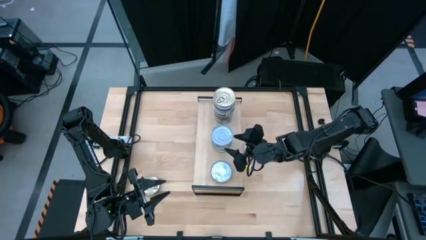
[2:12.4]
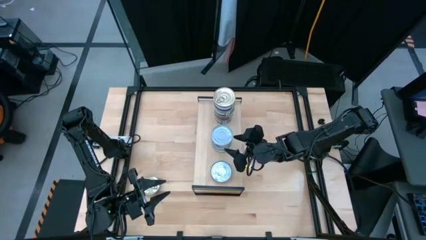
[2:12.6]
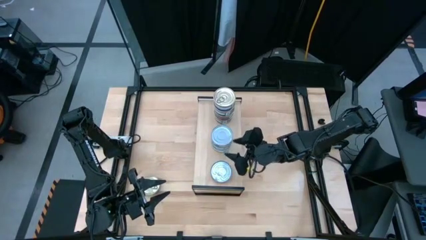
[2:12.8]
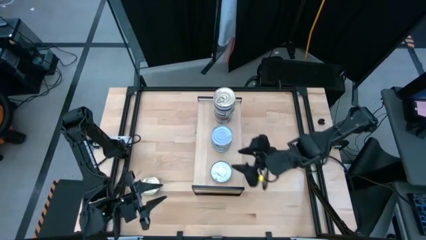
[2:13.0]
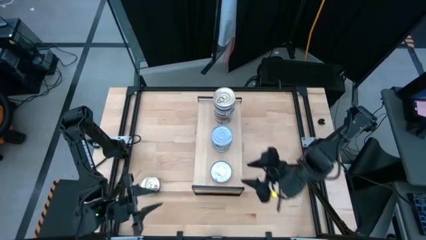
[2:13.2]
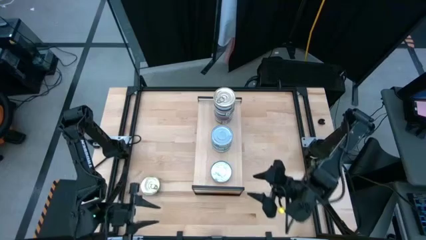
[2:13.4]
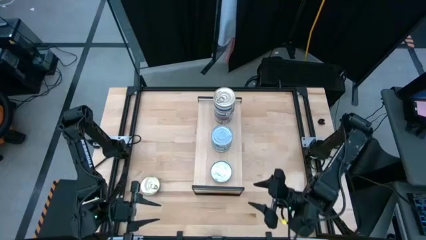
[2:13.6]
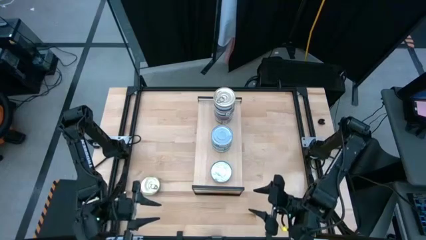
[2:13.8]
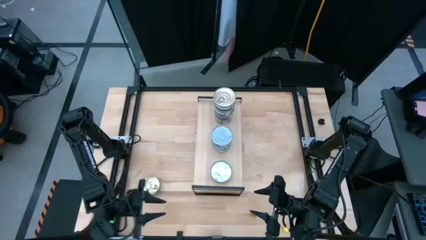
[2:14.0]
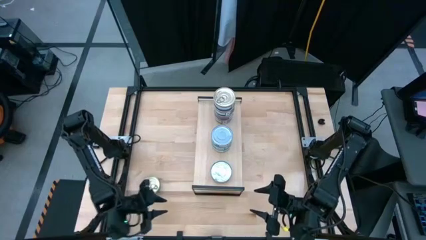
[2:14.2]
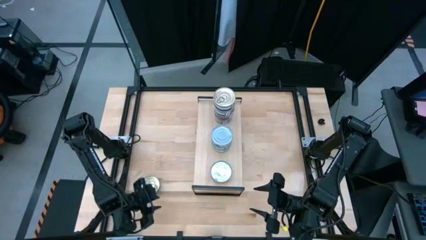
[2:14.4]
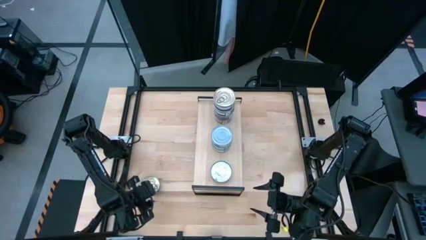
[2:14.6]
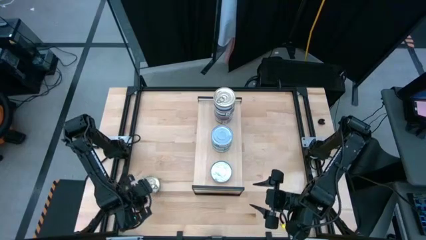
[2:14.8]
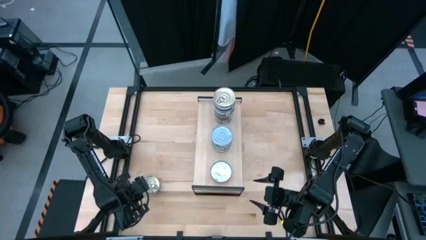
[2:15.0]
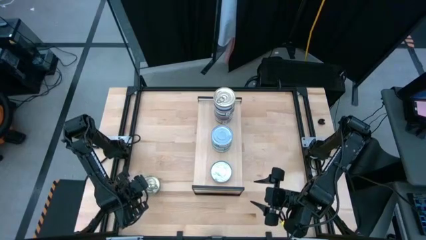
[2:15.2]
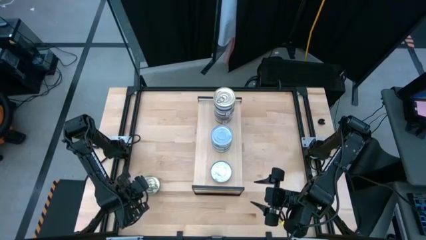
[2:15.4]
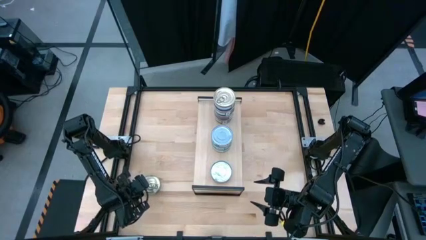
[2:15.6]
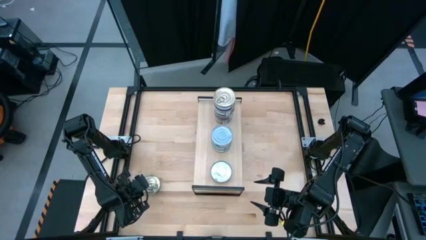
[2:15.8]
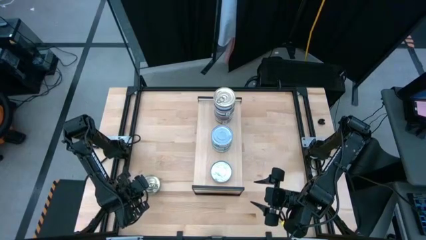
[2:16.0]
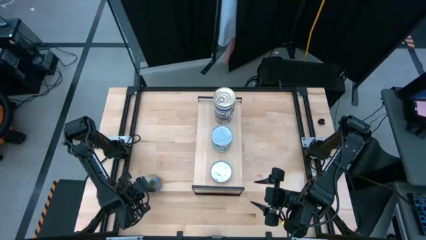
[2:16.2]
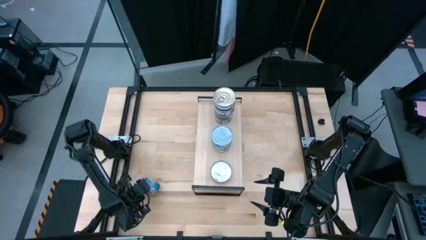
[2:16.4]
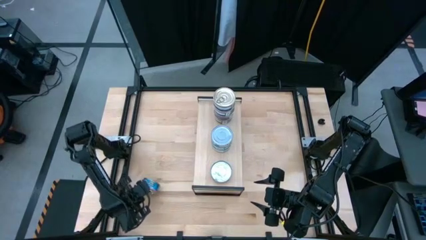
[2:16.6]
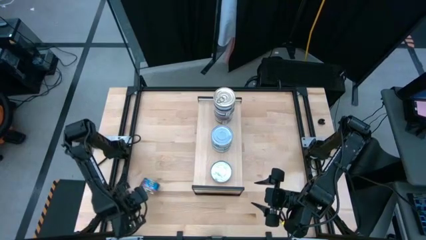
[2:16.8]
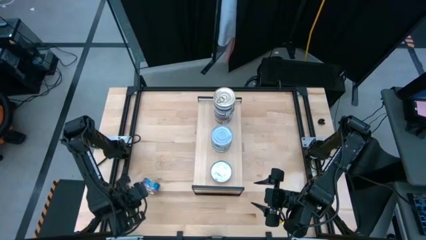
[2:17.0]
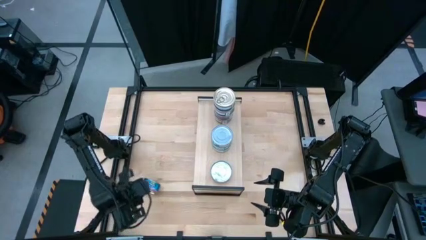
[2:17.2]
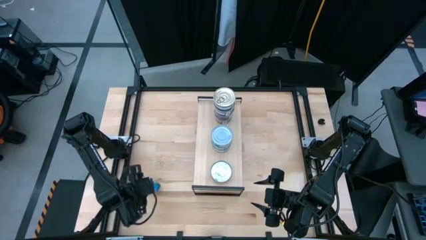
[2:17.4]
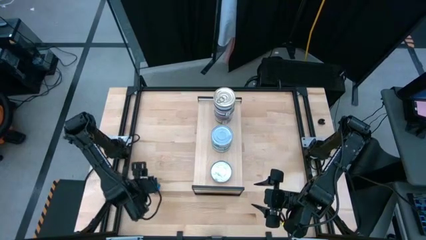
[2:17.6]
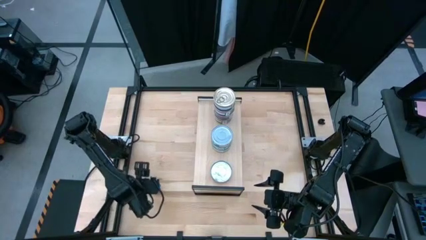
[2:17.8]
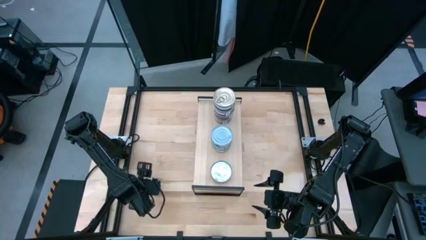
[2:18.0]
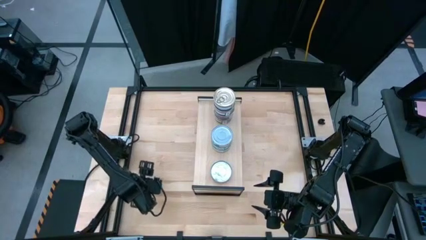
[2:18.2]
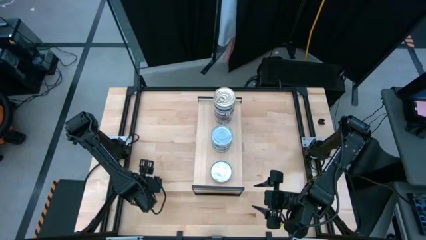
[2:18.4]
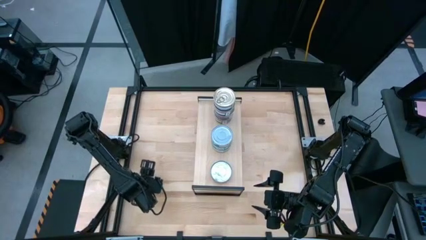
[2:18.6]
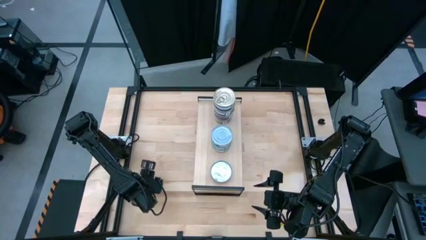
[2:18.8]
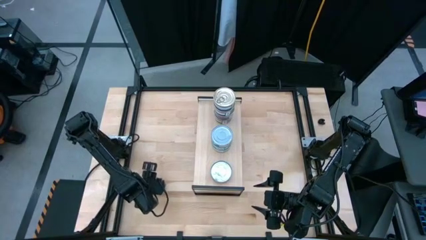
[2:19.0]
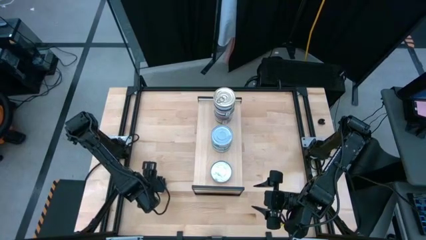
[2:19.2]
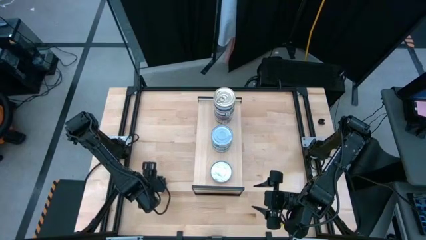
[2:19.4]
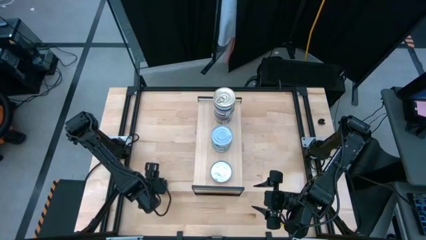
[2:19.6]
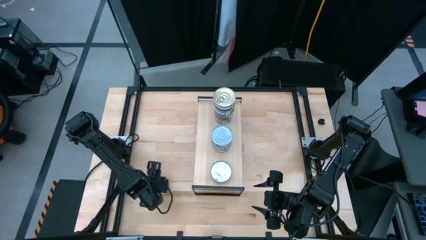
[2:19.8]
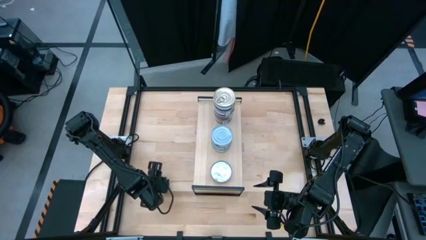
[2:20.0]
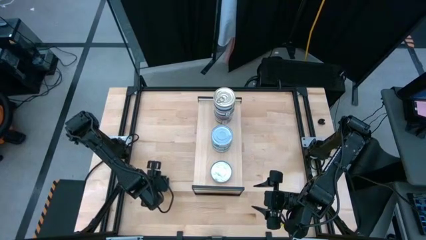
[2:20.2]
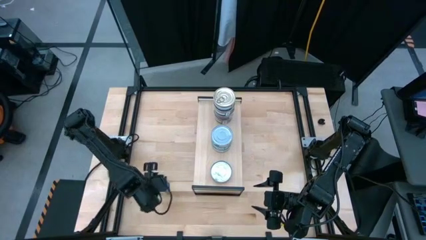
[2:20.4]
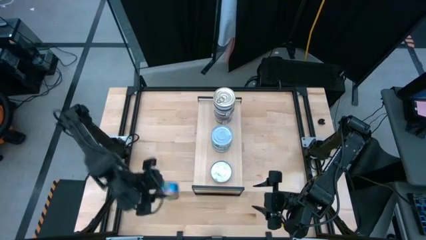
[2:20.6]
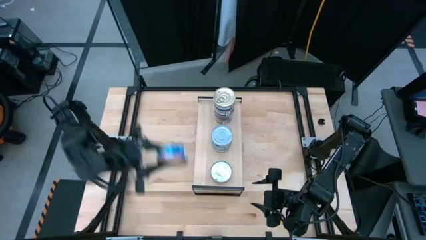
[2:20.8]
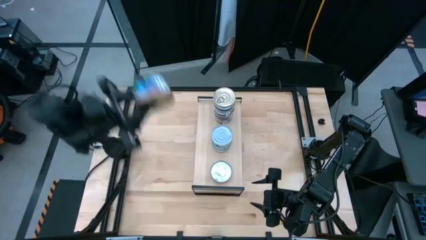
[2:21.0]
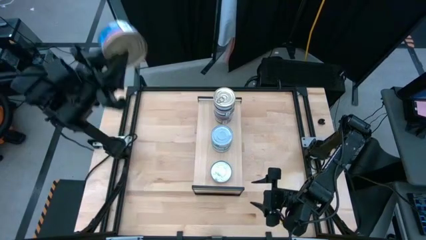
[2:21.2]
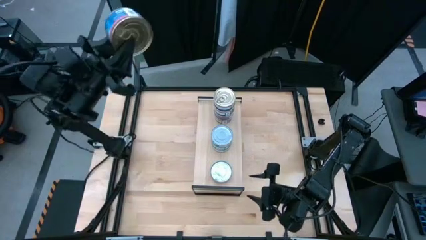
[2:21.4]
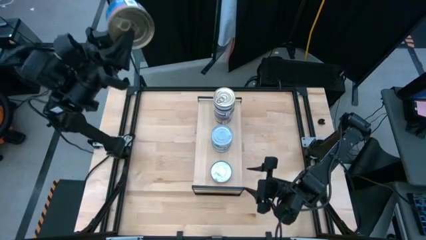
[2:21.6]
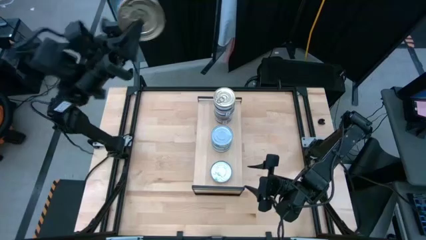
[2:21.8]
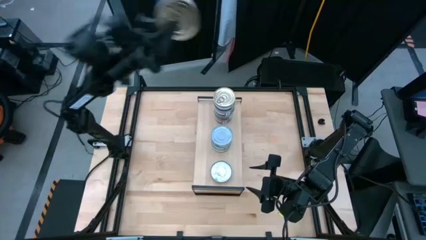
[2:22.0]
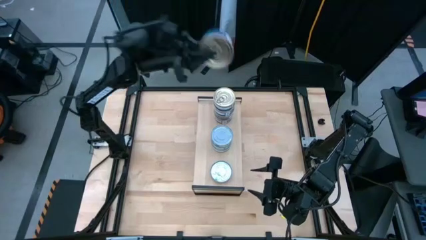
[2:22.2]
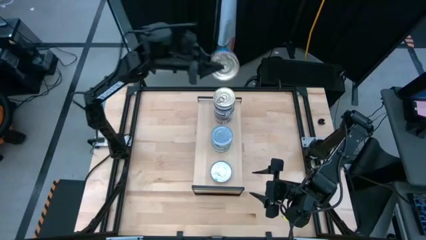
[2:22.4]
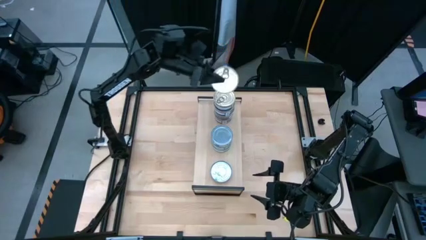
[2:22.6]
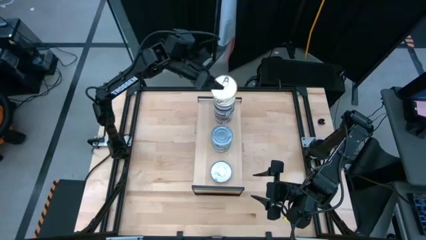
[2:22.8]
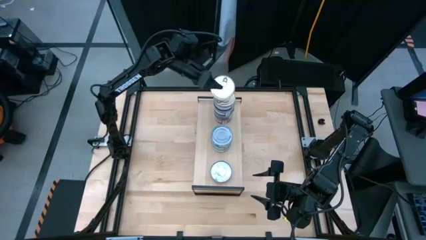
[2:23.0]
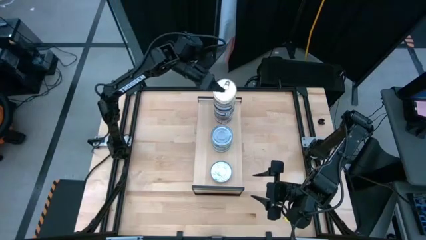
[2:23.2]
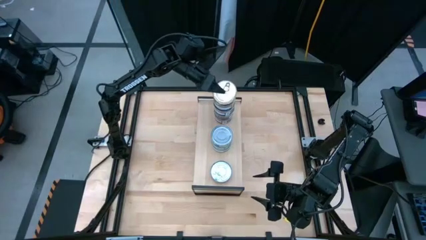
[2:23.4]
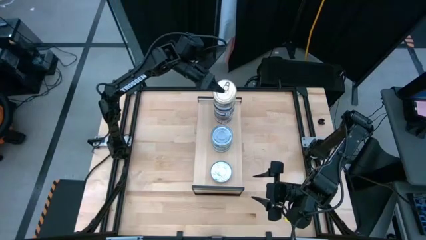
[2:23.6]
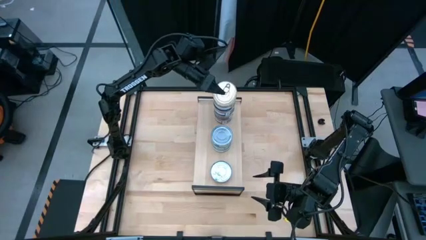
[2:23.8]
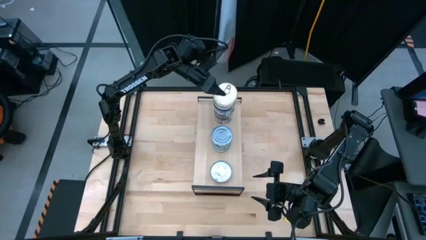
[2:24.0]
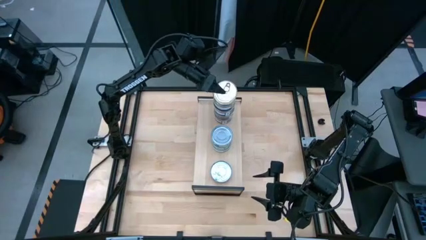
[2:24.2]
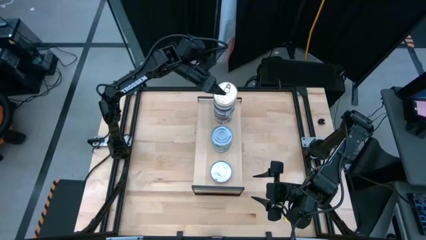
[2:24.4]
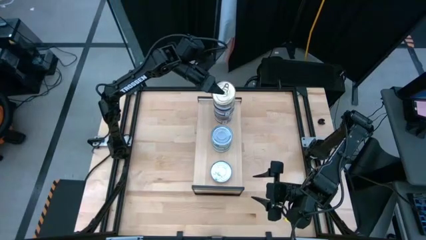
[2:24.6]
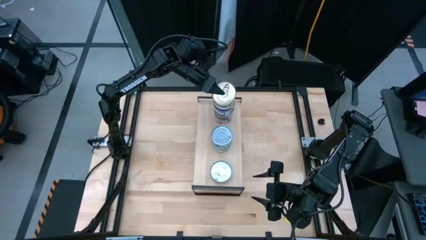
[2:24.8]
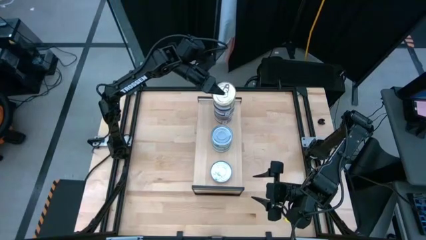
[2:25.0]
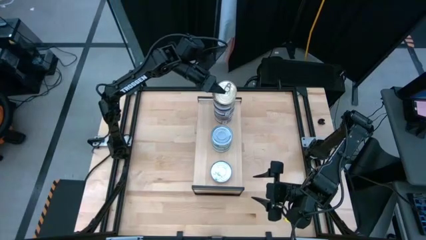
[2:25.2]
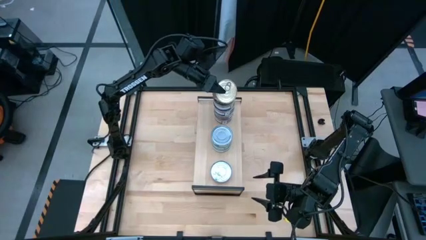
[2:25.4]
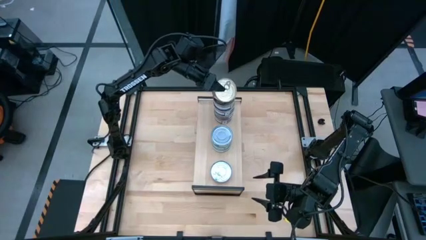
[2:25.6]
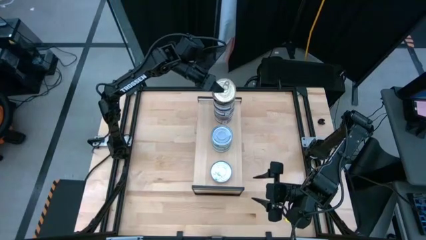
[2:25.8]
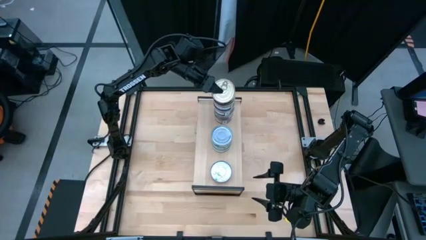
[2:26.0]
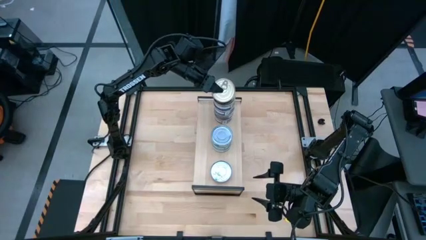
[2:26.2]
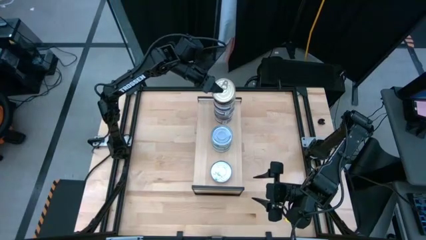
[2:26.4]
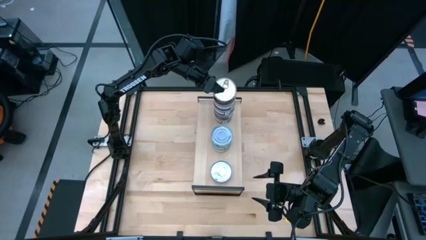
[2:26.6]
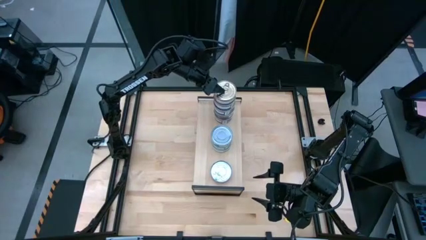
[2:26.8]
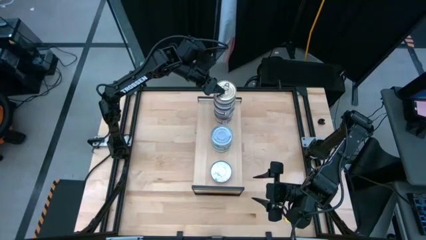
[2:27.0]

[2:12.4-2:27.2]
Task: Stack canned seafood by type on shelf
Stack the blue-pink tuna can on the other blue-pink tuna can

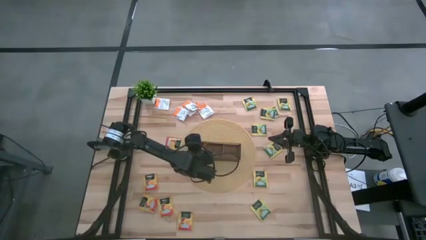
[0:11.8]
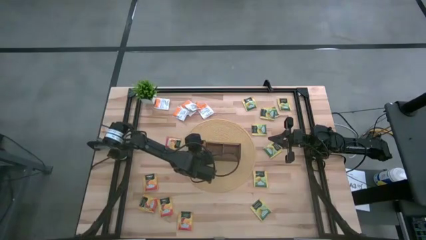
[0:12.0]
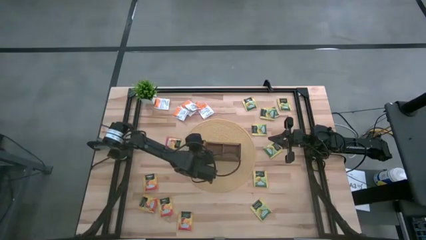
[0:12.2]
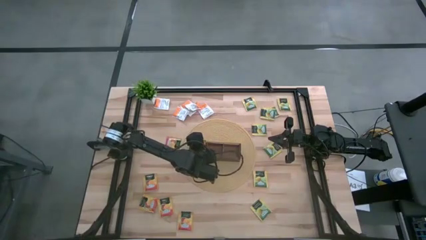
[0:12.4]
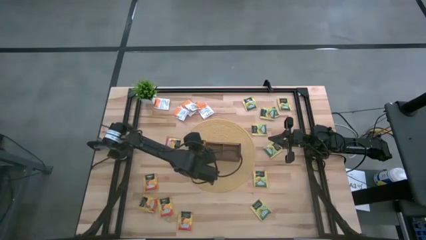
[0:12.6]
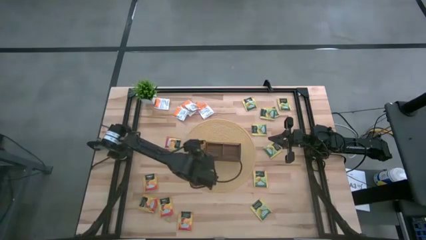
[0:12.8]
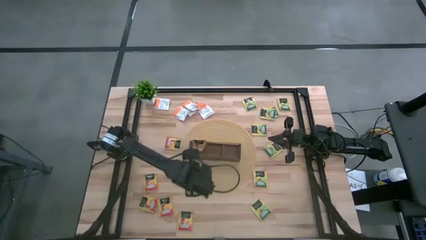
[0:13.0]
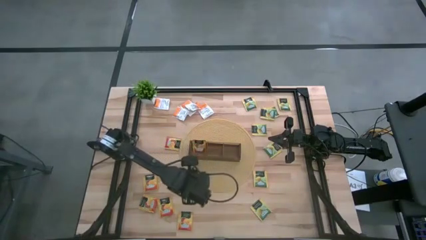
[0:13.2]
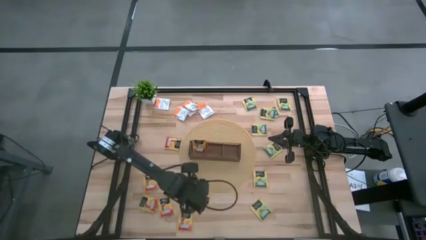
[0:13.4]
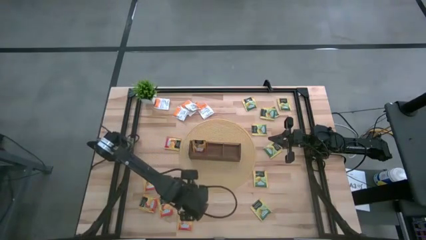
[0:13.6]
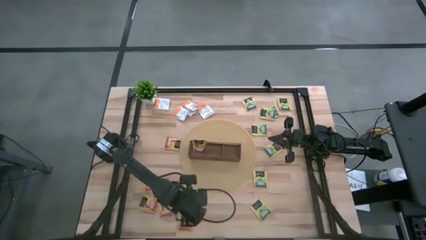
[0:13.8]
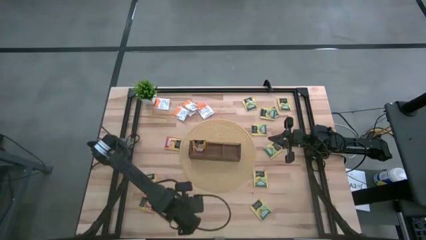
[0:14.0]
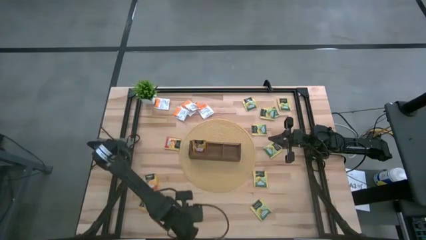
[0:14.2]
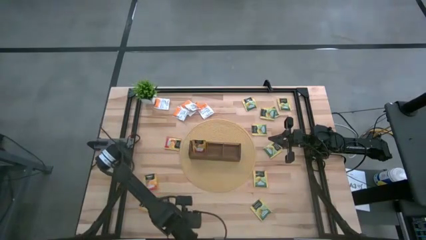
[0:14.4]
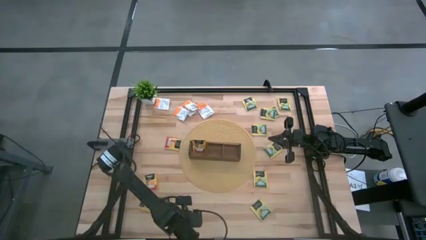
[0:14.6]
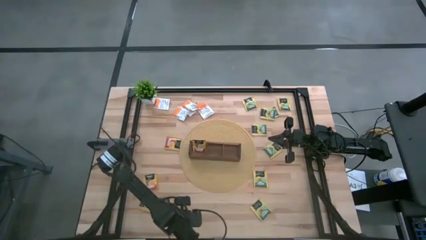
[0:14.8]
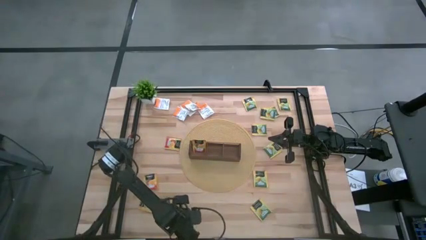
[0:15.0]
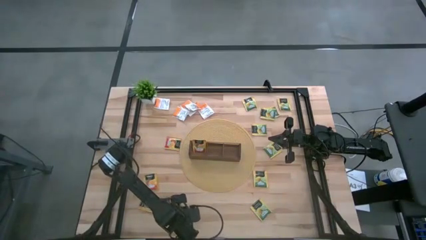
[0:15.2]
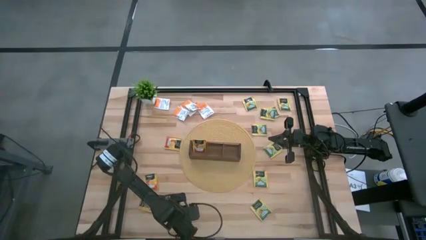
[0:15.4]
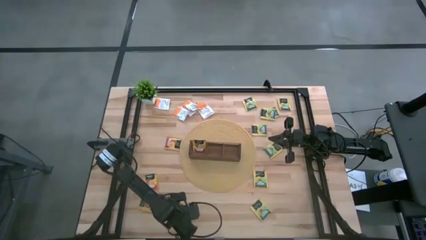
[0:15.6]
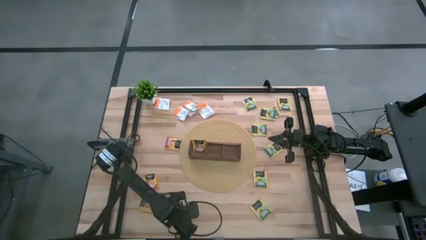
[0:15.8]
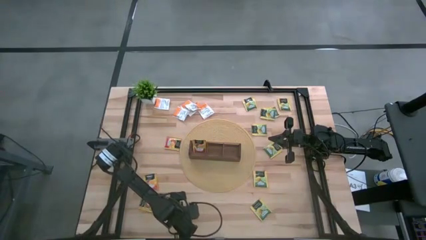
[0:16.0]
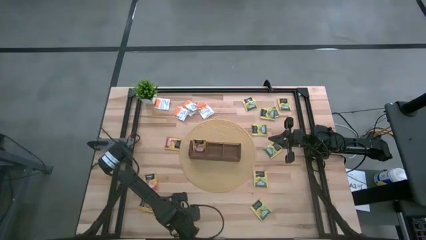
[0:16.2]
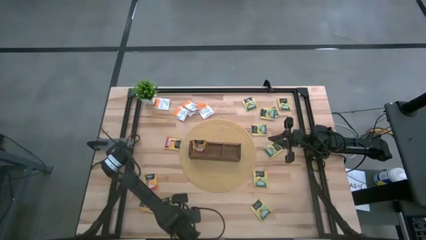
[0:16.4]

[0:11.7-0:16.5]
Task: Pick & Place Tea
Put the mango tea sachet into the left section of the wooden organizer
